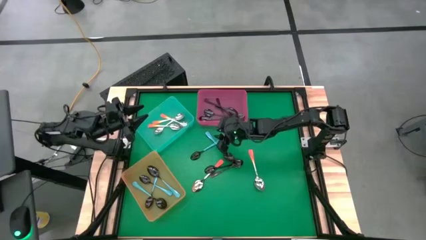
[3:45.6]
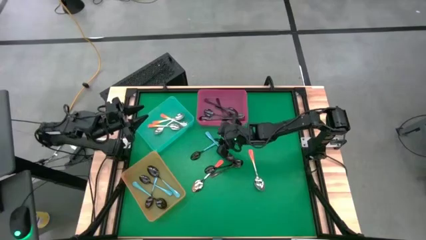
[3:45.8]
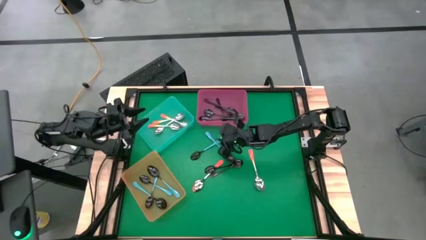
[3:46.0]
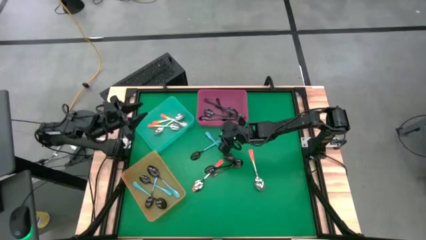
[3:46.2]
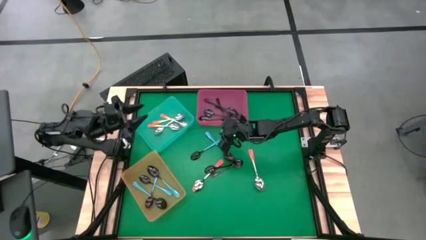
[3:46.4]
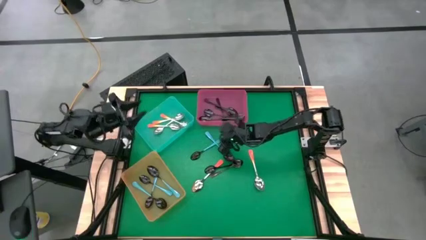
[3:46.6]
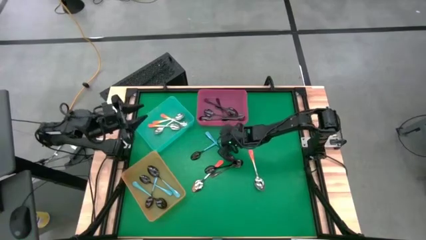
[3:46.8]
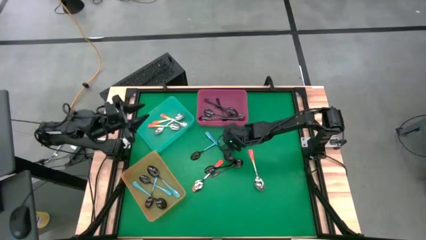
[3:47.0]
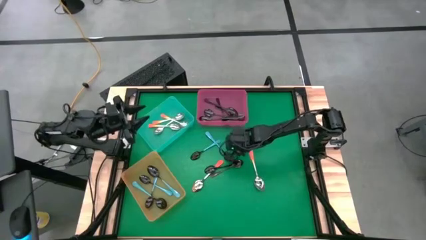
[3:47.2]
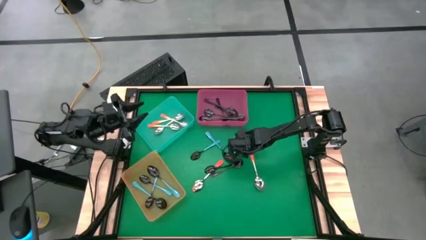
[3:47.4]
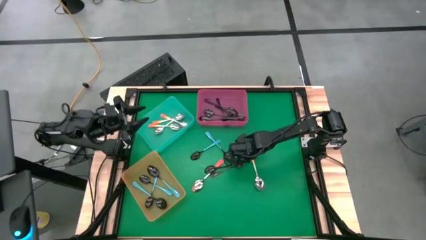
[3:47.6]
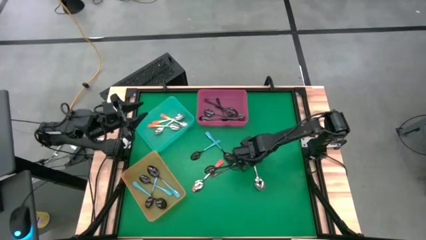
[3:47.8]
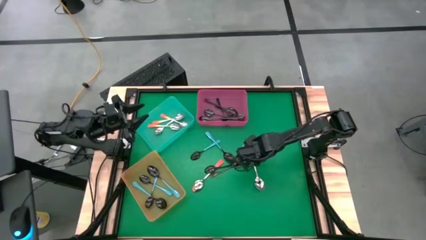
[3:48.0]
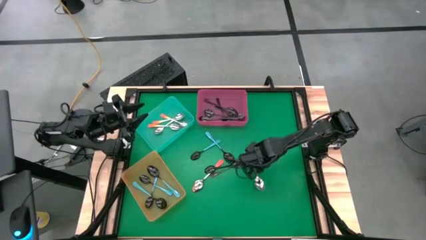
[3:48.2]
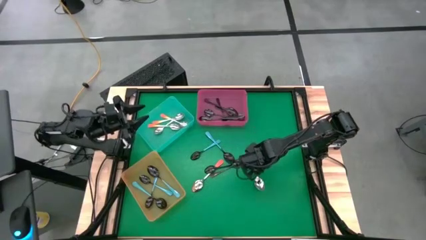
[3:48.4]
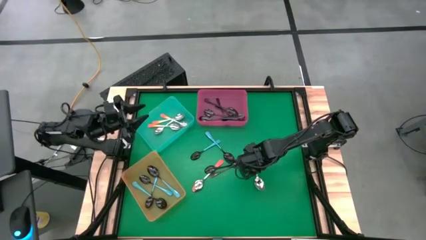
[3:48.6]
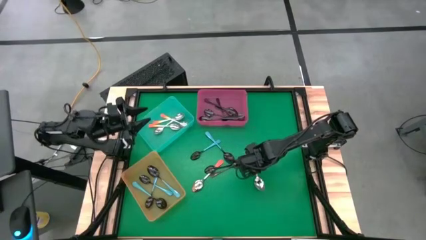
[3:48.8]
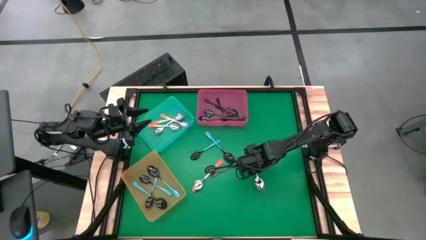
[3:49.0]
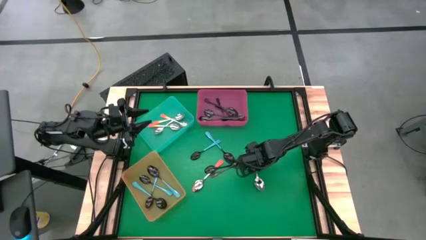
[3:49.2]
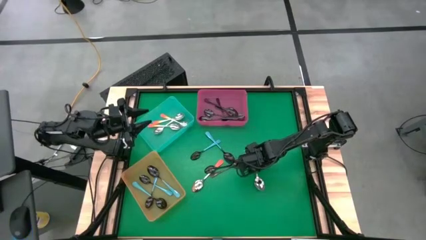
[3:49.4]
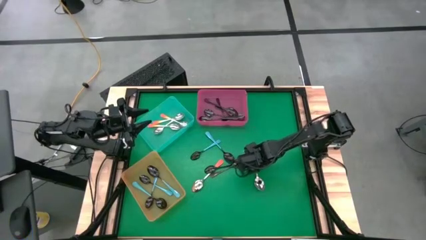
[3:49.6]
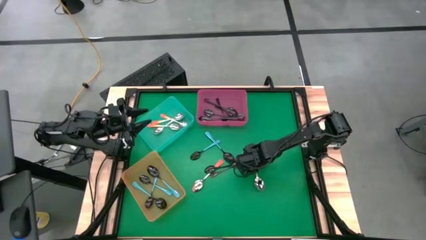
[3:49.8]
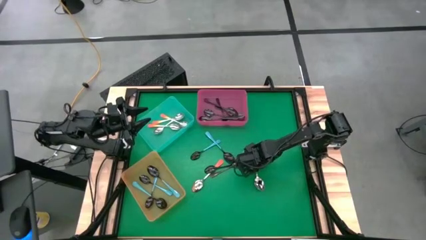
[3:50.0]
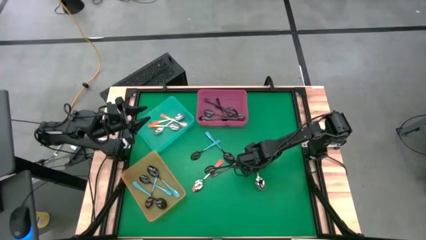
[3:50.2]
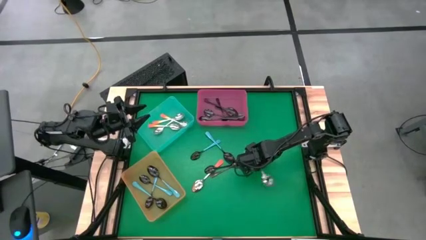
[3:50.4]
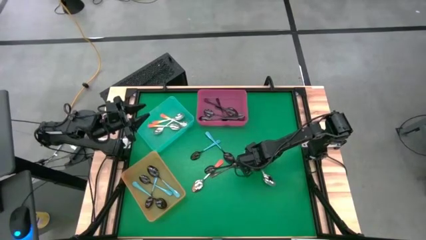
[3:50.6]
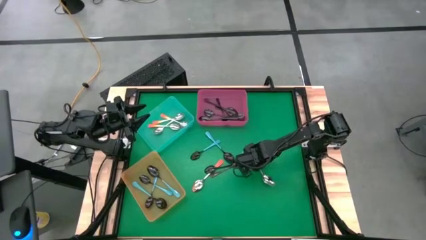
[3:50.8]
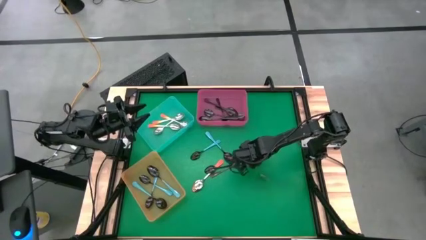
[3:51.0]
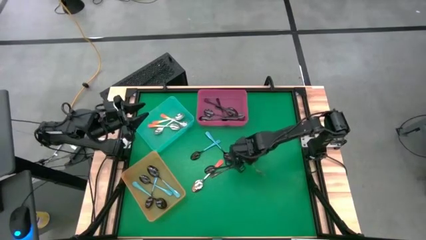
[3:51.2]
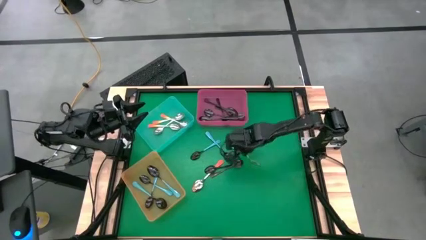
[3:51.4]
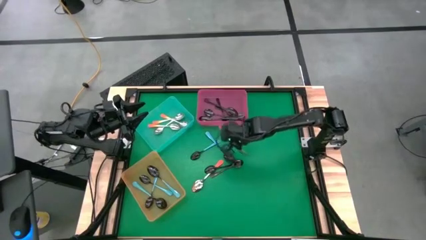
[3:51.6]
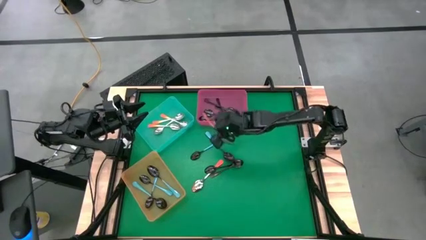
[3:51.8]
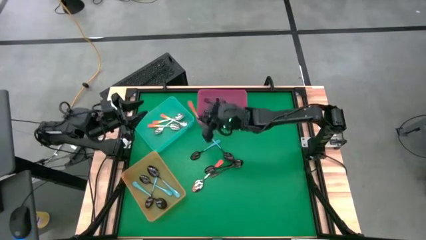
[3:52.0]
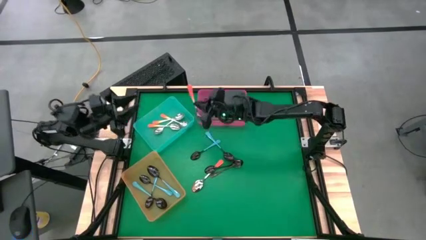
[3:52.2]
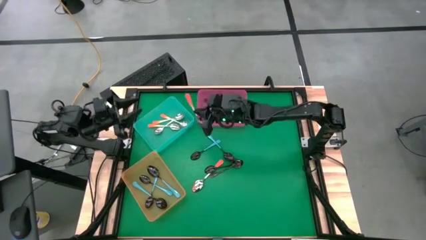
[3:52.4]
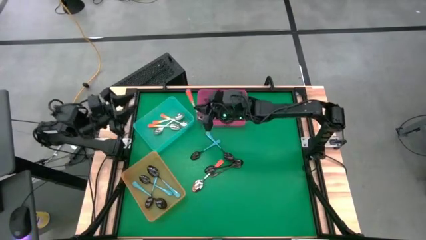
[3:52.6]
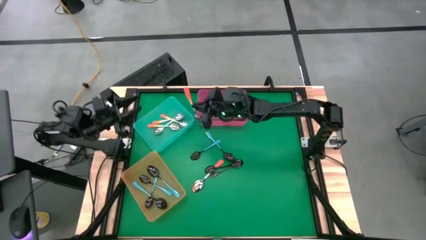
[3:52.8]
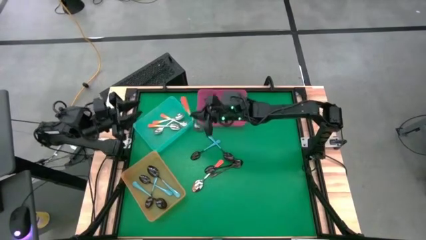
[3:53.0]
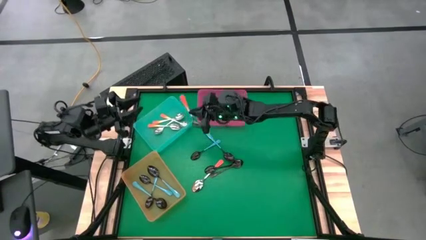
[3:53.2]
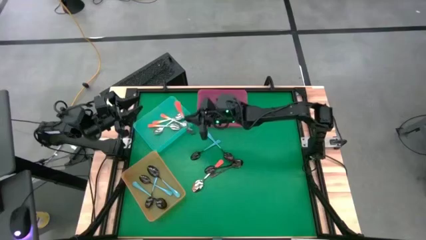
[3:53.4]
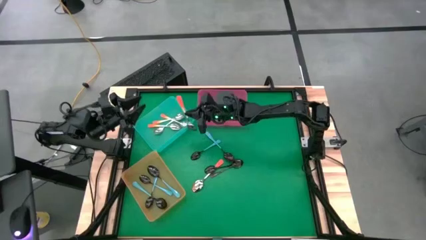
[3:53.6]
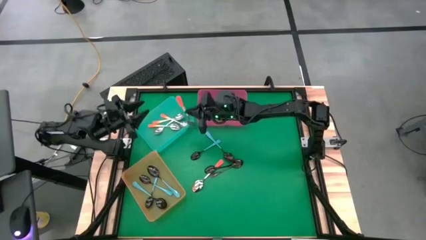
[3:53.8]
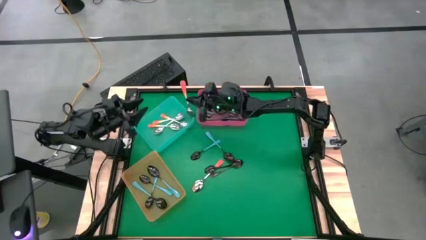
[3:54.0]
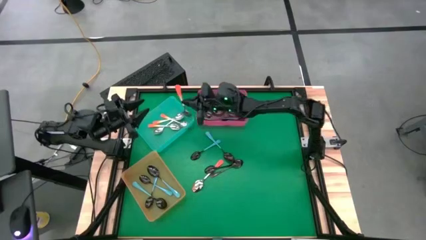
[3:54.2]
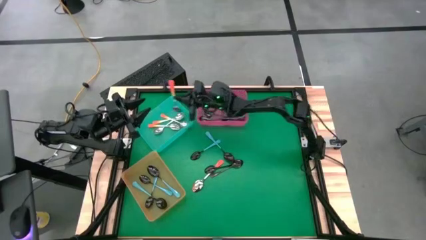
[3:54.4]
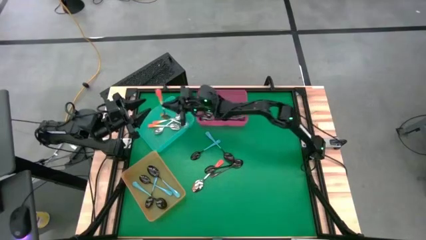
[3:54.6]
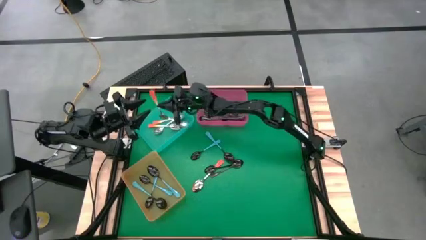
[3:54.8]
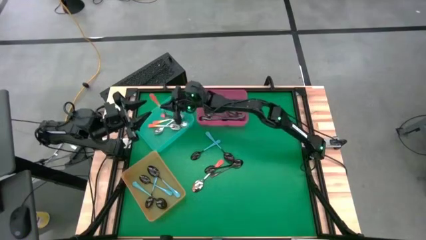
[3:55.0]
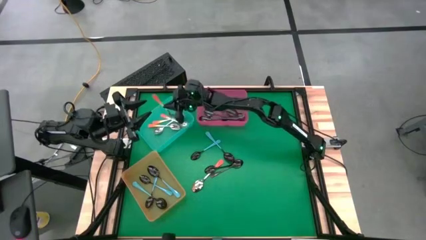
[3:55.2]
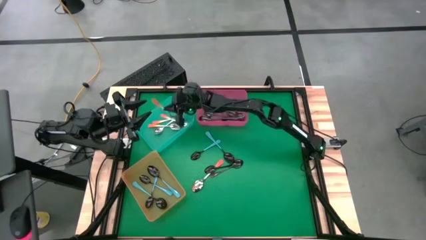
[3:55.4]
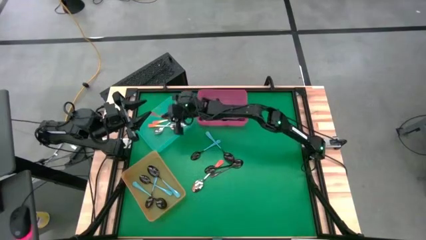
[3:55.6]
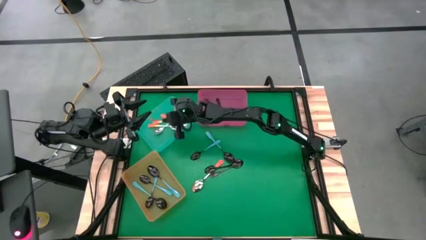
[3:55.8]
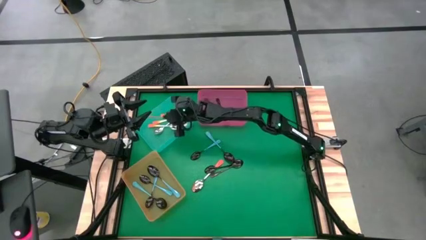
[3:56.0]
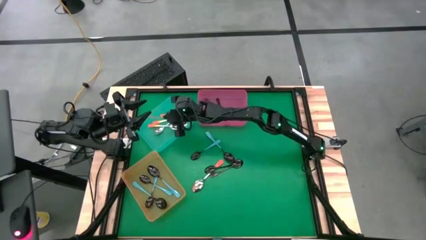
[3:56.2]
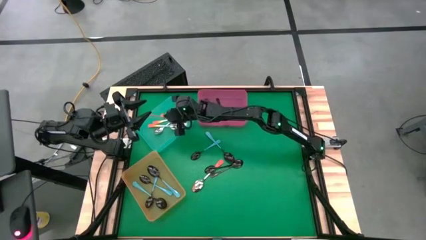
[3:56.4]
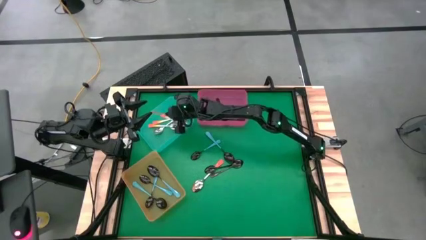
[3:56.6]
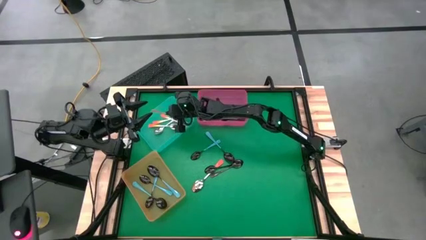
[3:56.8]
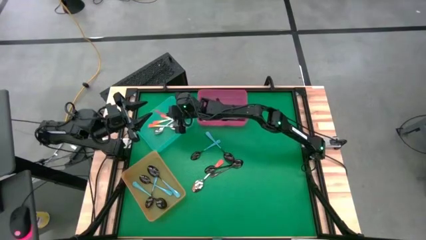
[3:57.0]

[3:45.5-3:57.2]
Task: Sort silverware by color (type)
Put the orange spoon into the blue bin

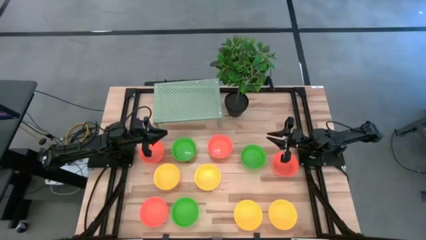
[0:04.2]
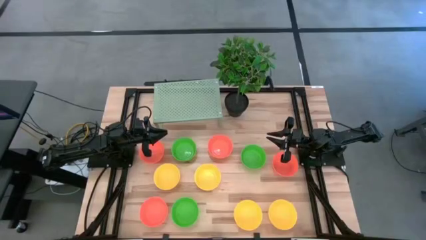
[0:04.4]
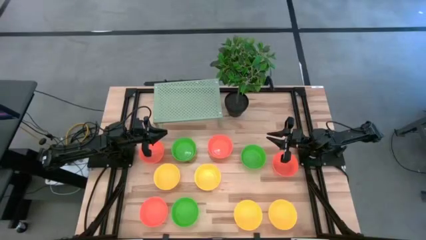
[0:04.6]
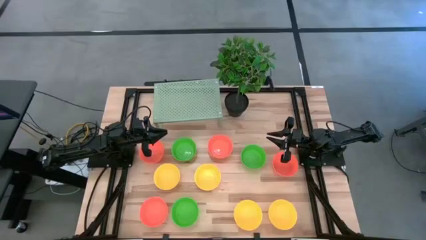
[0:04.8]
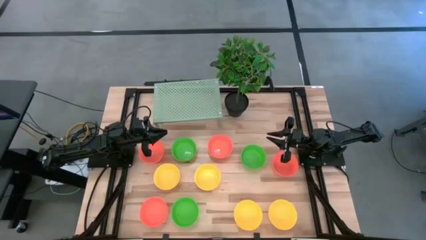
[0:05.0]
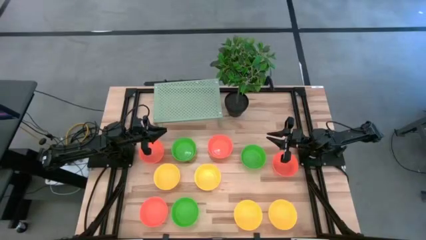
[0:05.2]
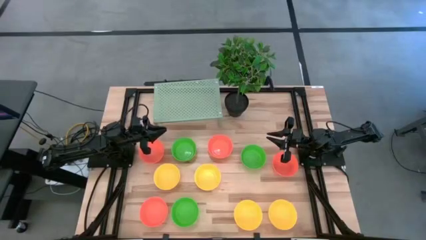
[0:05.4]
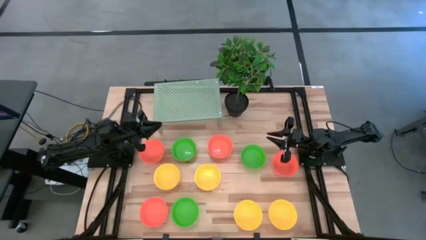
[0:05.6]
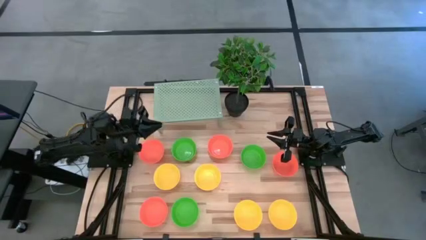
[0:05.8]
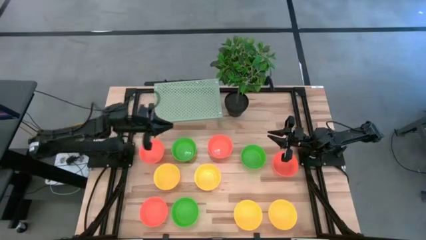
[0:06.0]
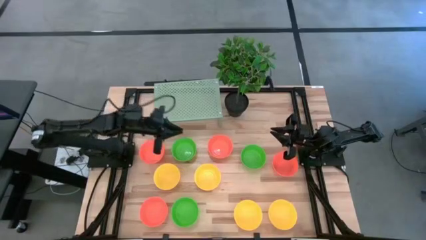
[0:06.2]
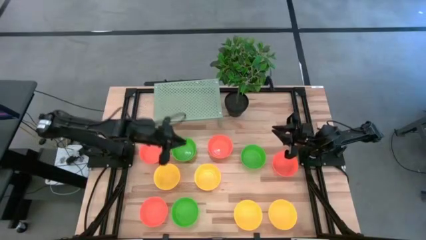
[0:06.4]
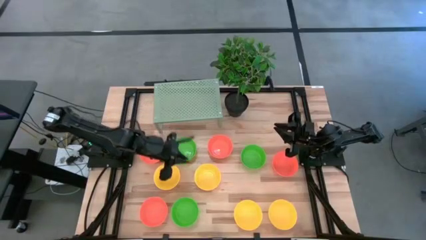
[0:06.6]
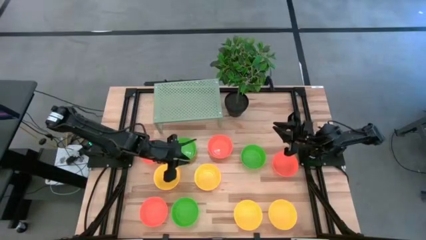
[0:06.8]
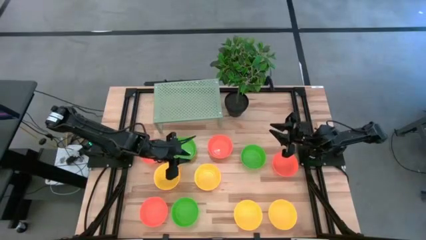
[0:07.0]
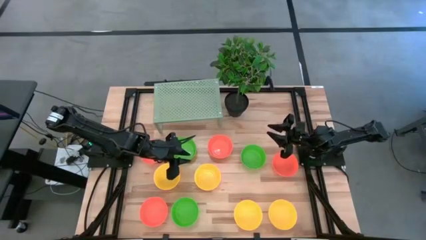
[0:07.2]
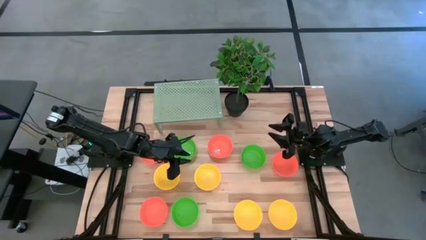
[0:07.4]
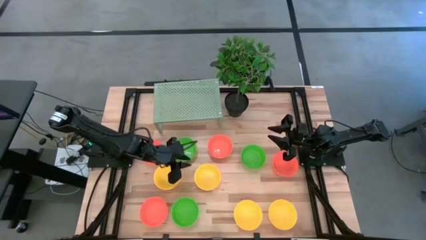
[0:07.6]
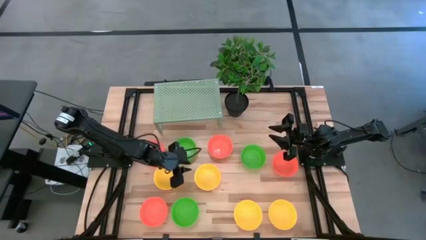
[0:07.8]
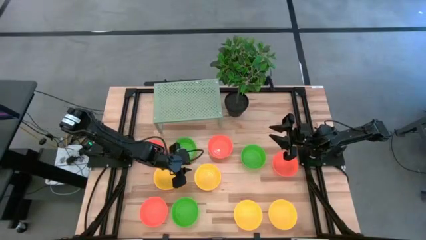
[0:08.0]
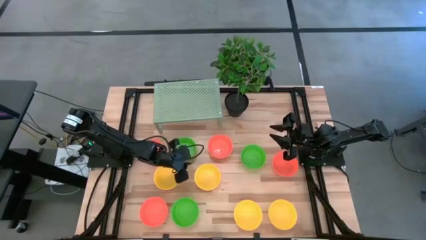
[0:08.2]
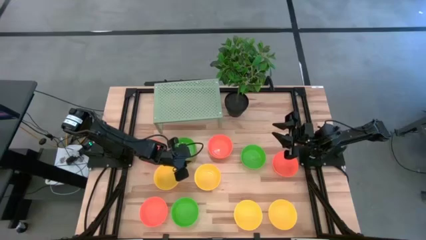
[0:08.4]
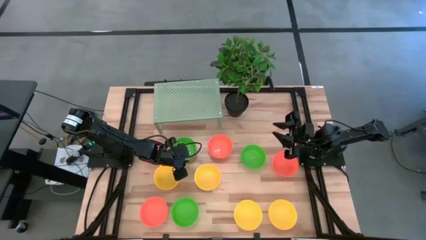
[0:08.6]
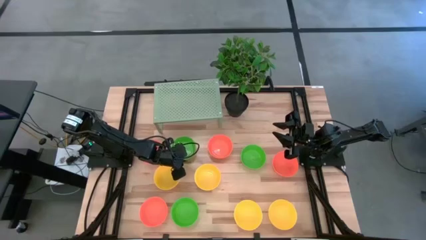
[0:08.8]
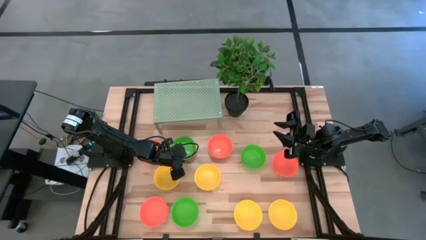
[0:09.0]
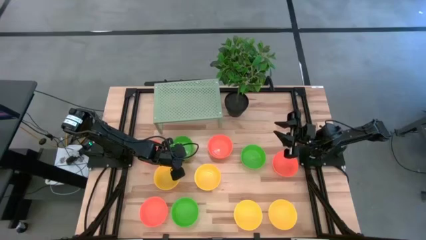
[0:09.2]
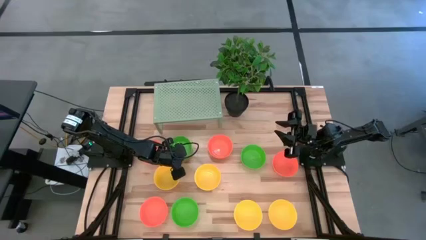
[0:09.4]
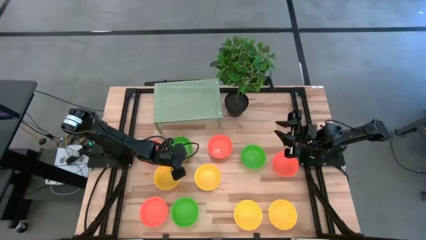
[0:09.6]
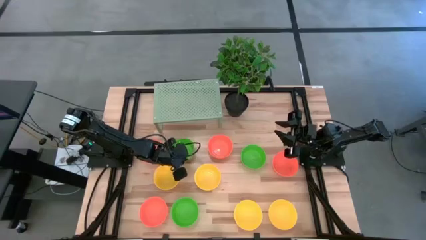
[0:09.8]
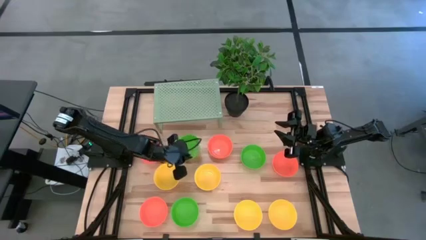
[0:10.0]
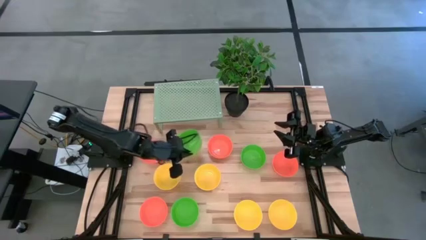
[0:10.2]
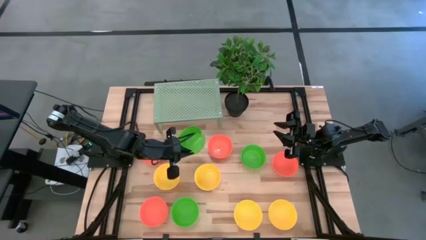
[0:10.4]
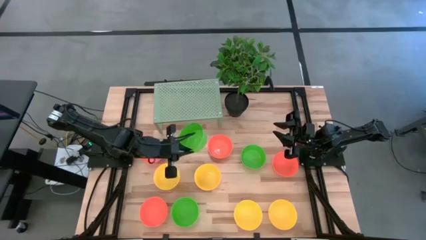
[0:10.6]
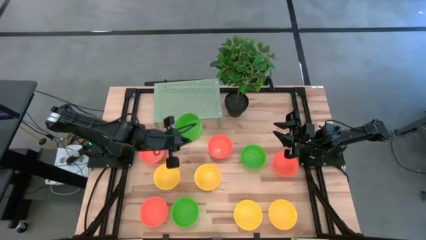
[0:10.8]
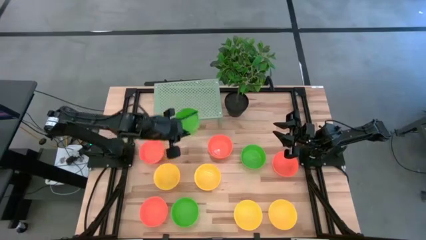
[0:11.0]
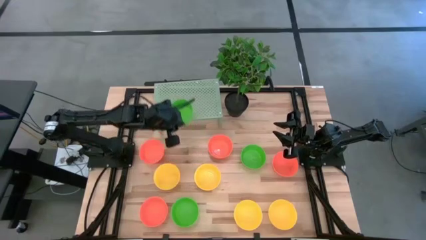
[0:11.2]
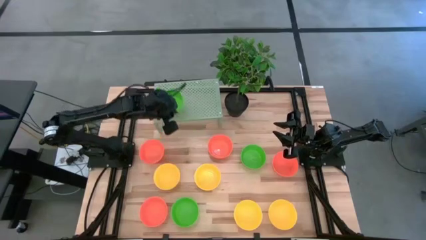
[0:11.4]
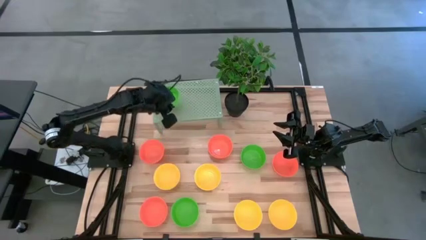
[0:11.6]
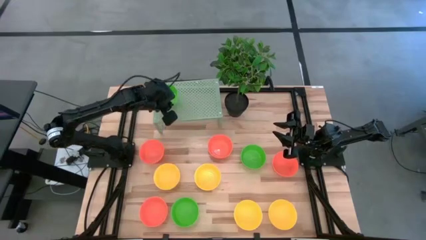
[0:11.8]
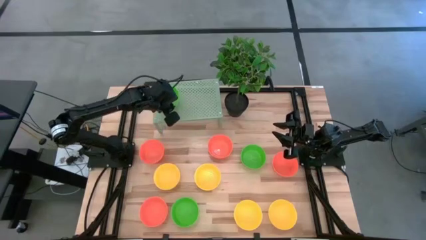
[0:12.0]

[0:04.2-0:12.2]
Task: Pick & Place Mini bowls
Put the green bowl on the shelf
